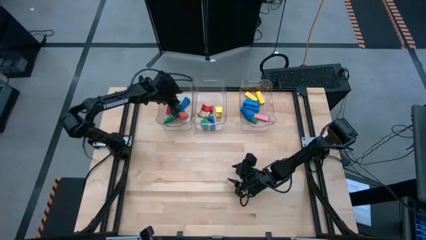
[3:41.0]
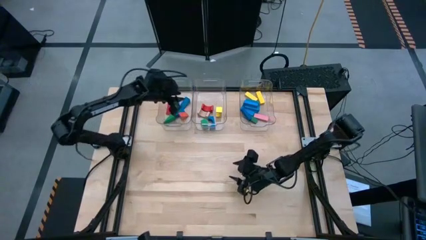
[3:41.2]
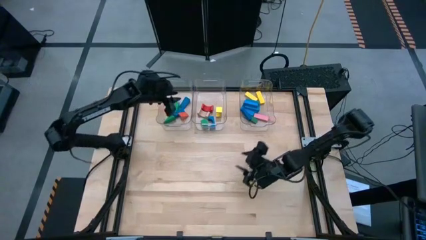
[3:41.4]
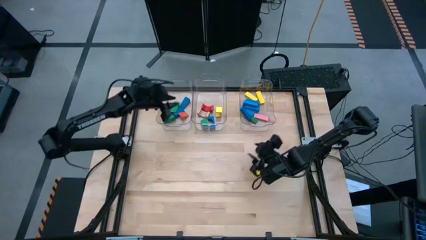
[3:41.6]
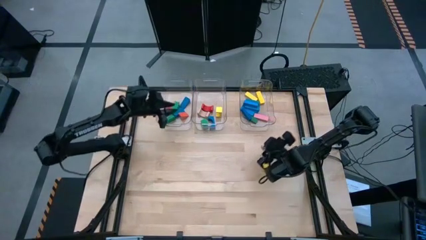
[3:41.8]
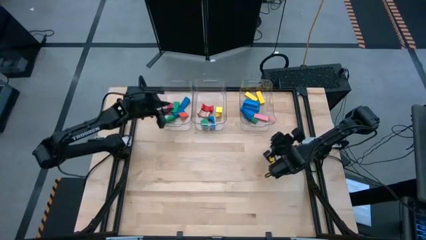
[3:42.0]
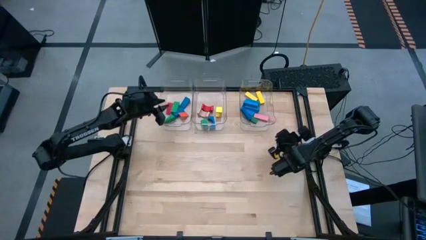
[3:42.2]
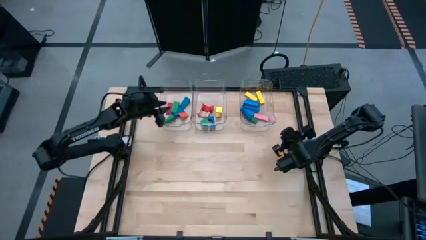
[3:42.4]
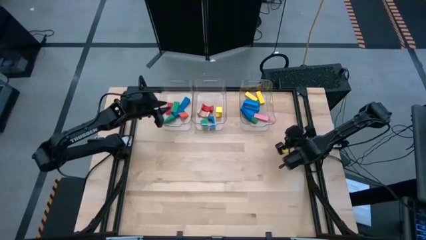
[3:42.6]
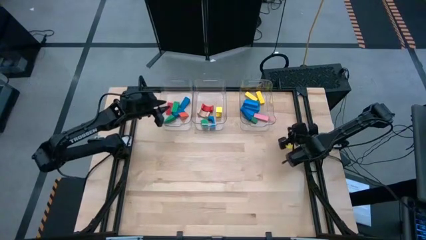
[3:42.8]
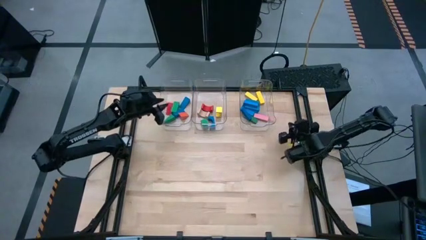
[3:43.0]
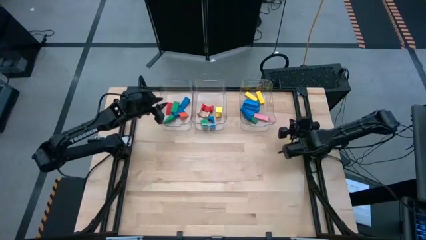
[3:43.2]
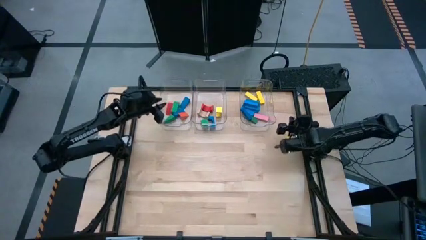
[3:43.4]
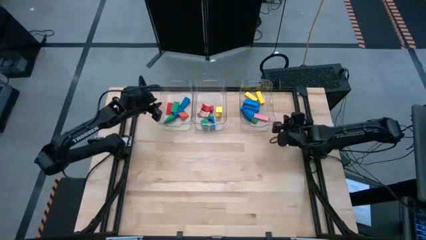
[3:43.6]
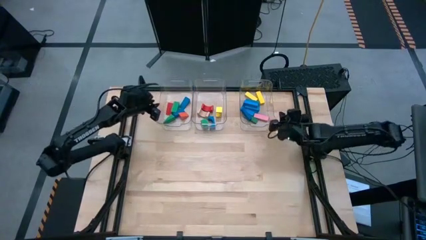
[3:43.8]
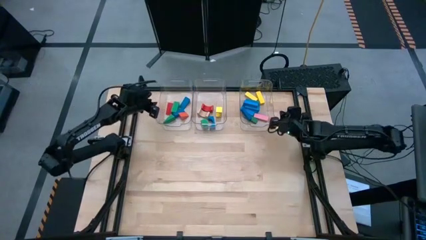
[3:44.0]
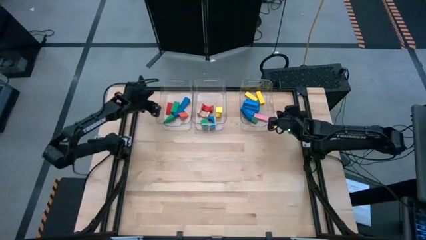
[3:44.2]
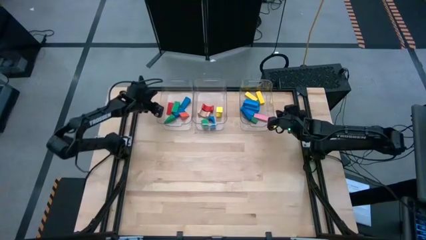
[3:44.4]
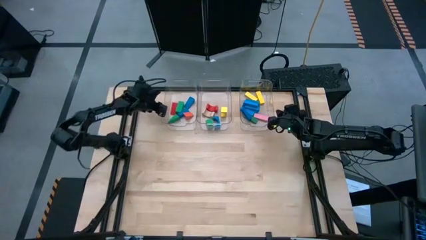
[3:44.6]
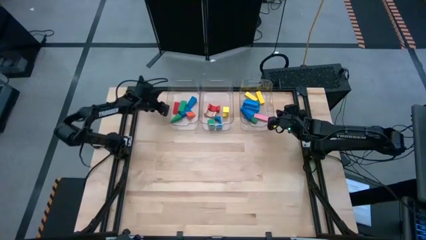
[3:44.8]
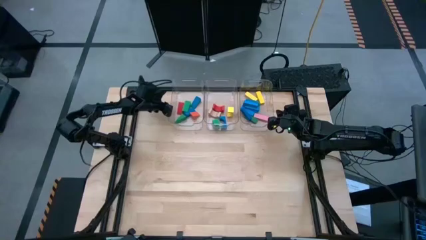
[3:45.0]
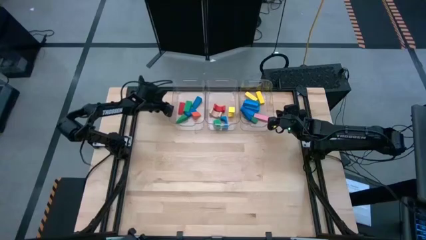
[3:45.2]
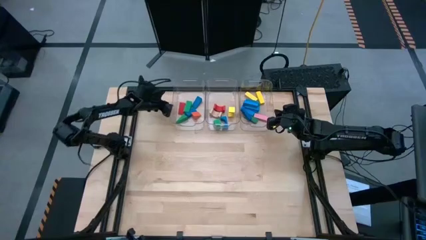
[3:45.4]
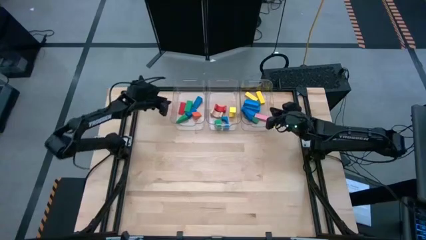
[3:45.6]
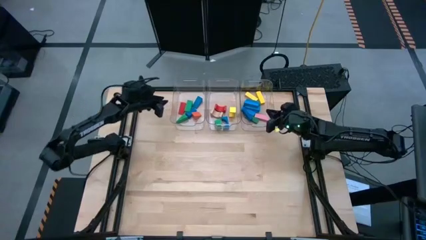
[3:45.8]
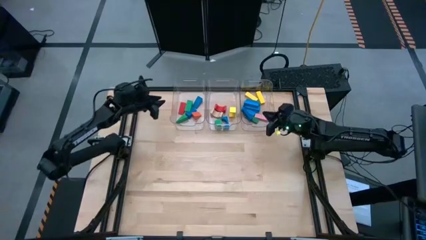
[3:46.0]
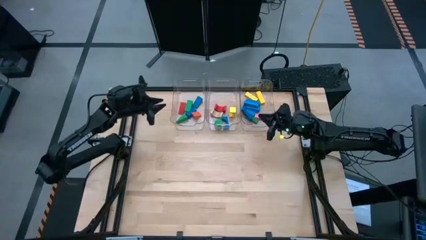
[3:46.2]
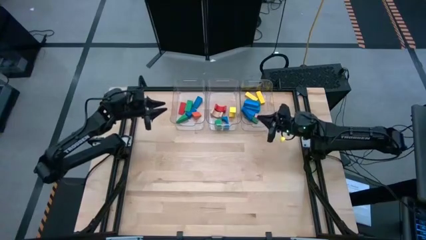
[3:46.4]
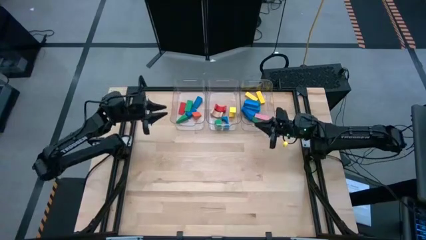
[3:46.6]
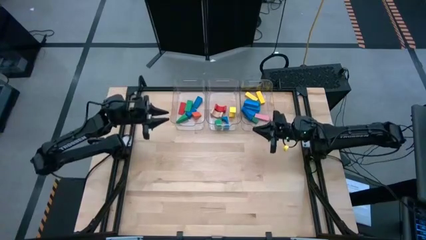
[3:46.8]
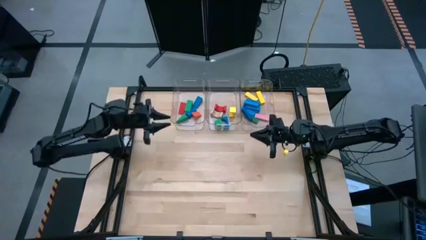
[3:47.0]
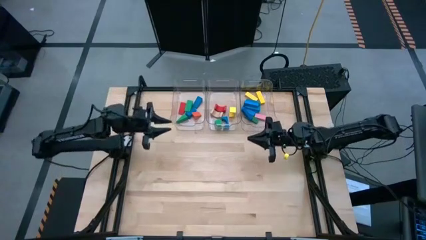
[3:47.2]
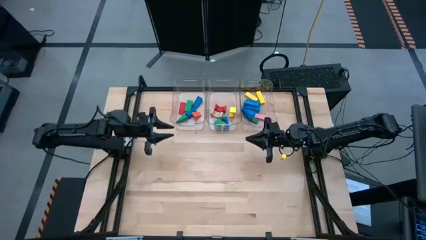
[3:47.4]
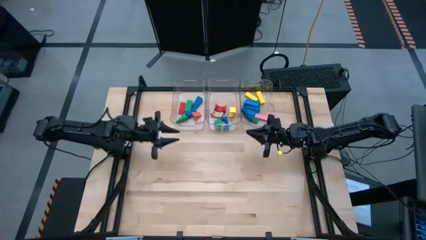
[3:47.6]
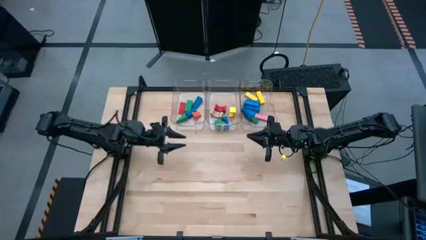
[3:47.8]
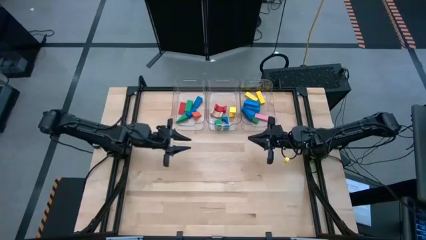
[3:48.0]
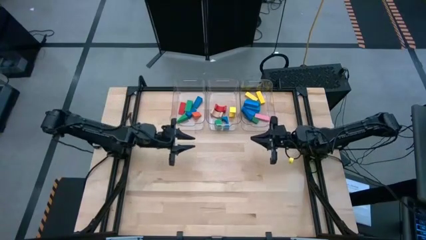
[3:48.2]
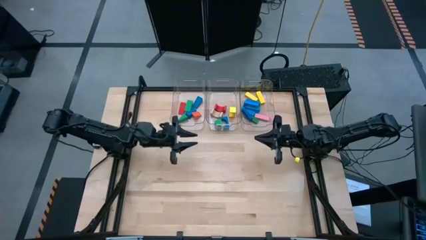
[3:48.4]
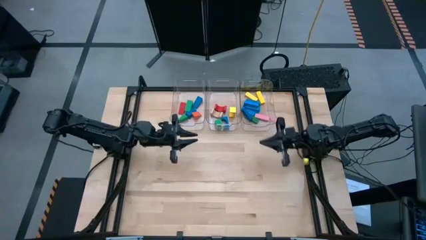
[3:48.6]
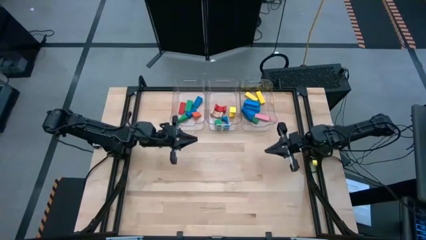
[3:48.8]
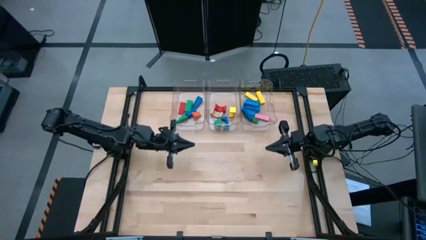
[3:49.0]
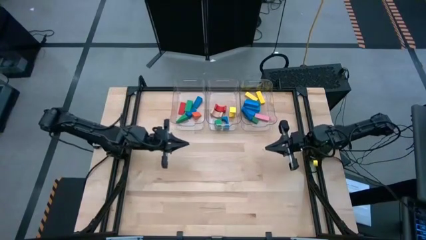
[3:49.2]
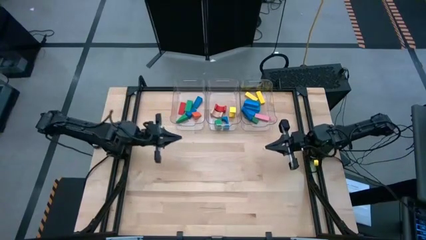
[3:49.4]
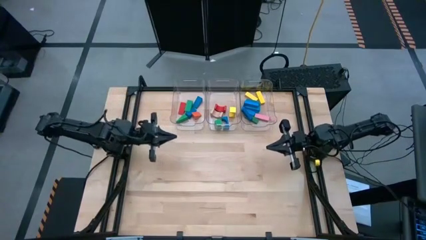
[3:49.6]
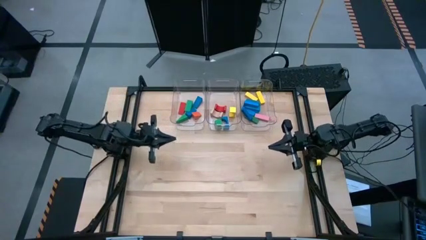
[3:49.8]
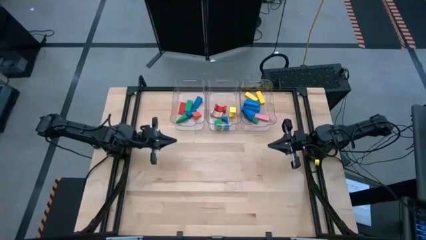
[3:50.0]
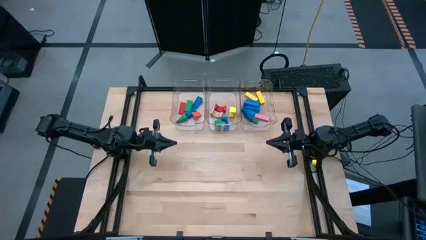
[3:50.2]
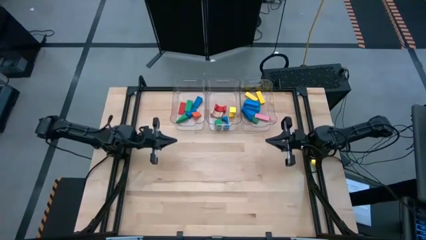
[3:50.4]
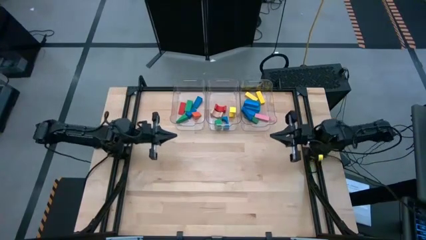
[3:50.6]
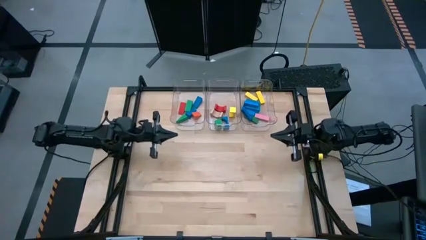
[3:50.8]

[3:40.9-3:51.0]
Task: Sort blocks by size
Return to Home Position
